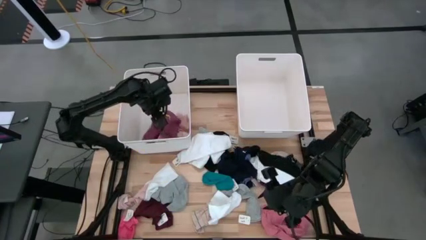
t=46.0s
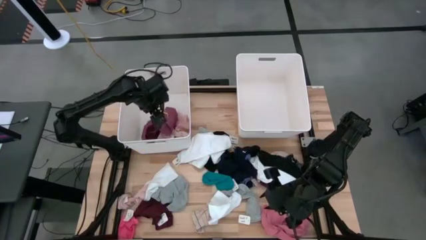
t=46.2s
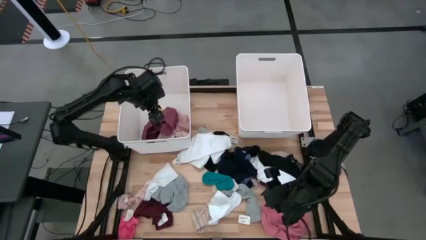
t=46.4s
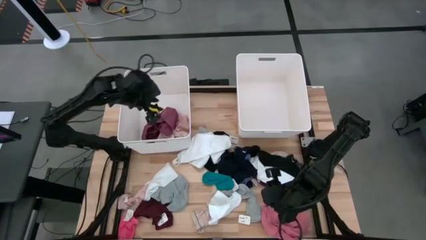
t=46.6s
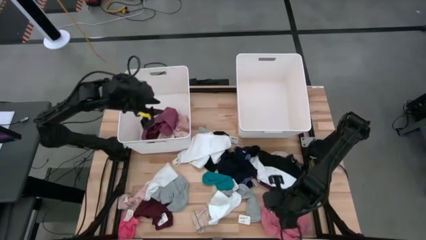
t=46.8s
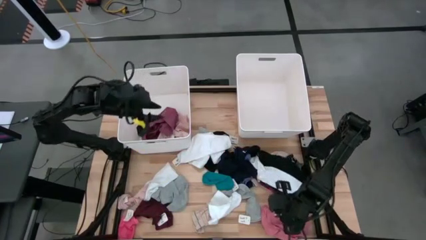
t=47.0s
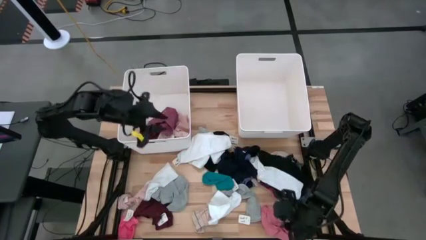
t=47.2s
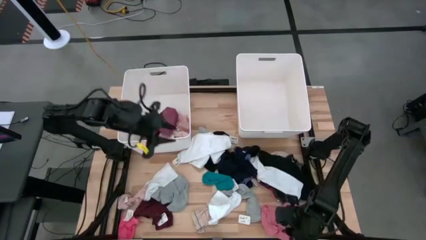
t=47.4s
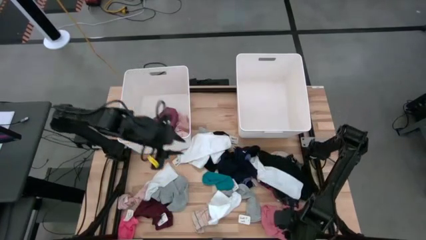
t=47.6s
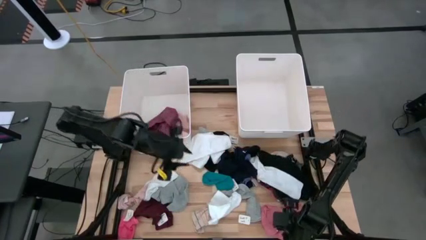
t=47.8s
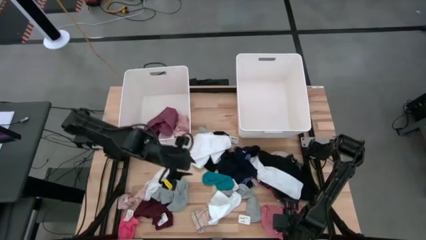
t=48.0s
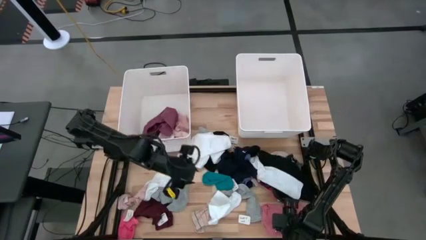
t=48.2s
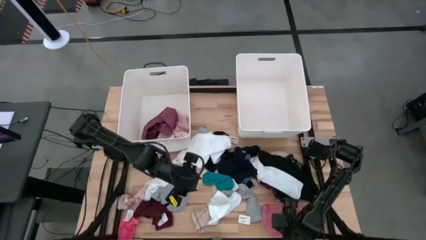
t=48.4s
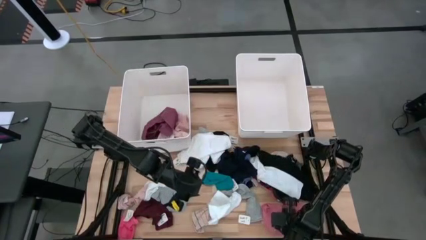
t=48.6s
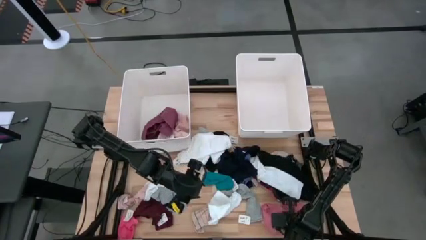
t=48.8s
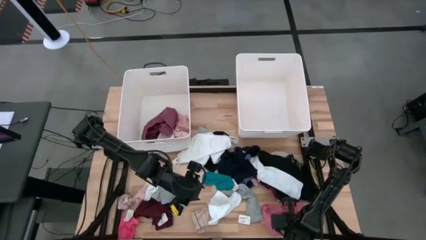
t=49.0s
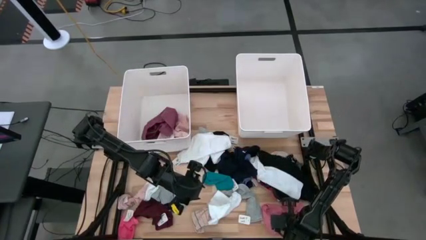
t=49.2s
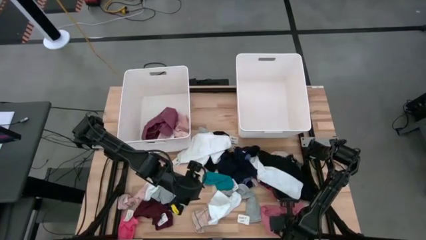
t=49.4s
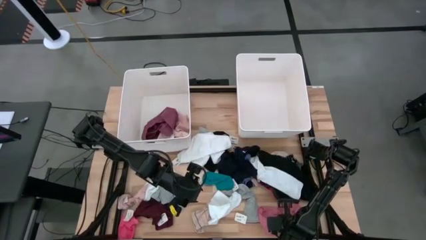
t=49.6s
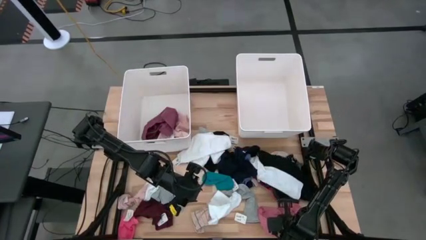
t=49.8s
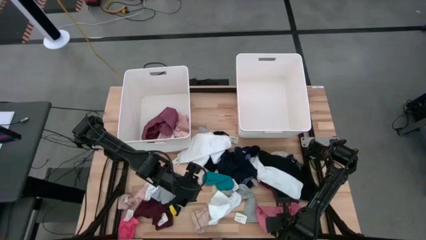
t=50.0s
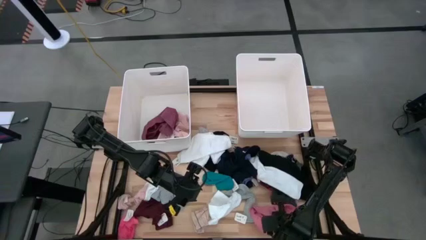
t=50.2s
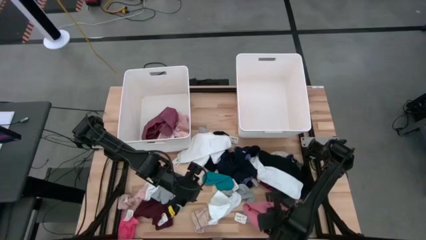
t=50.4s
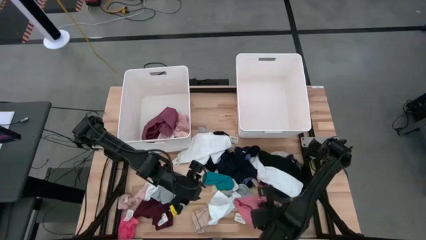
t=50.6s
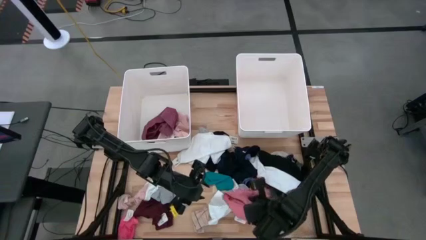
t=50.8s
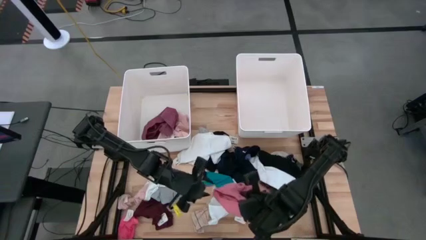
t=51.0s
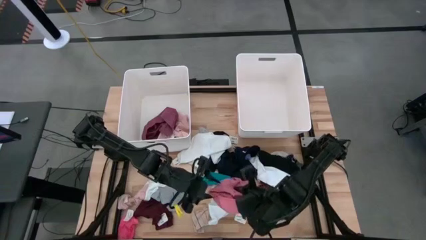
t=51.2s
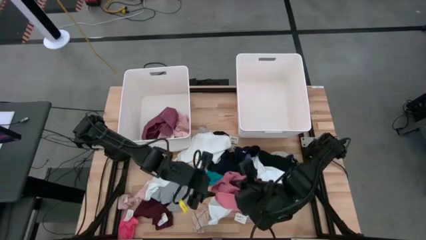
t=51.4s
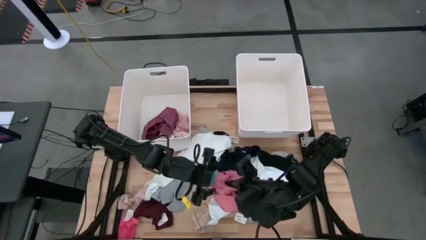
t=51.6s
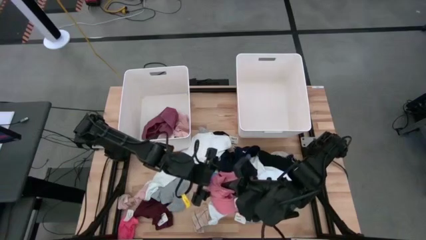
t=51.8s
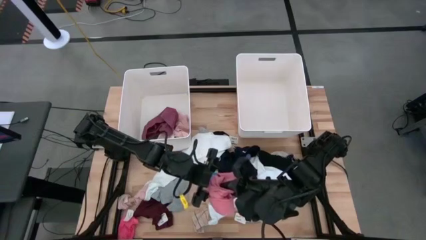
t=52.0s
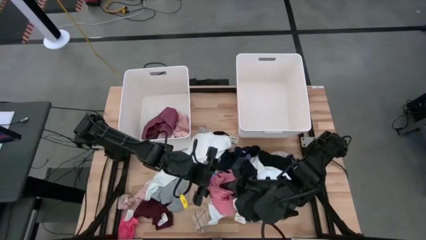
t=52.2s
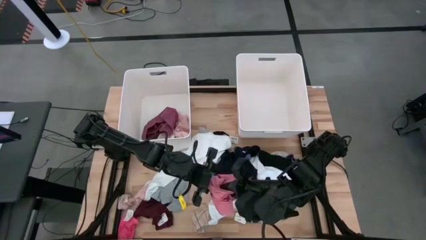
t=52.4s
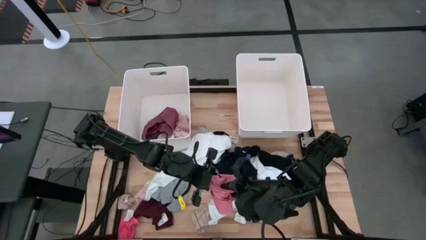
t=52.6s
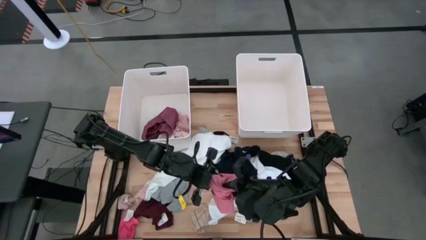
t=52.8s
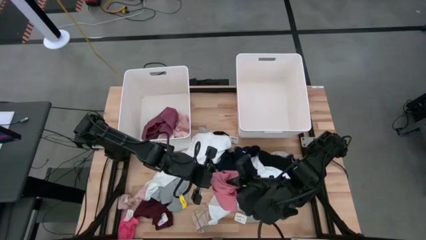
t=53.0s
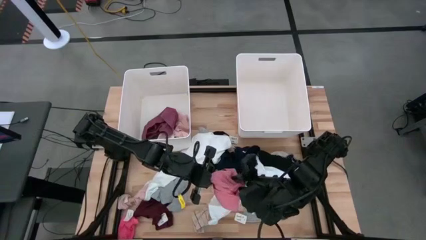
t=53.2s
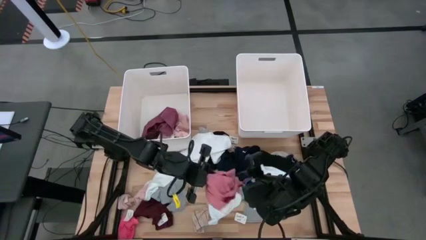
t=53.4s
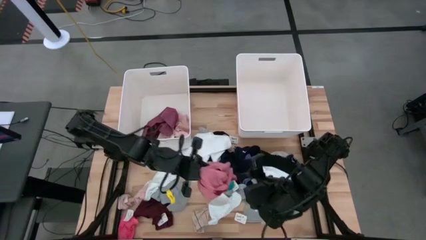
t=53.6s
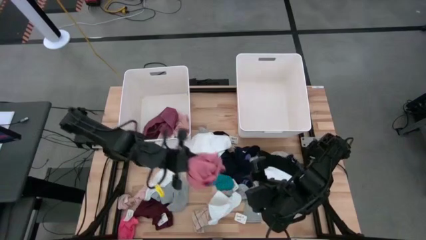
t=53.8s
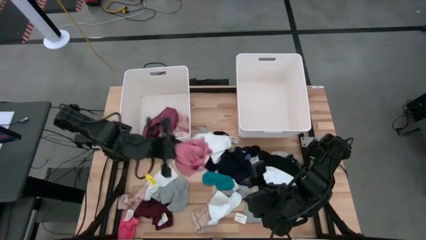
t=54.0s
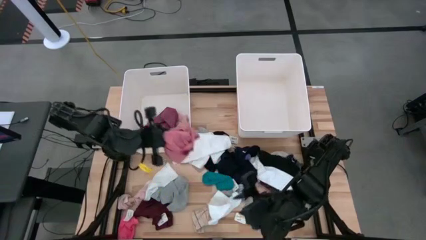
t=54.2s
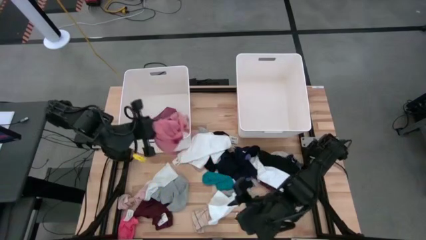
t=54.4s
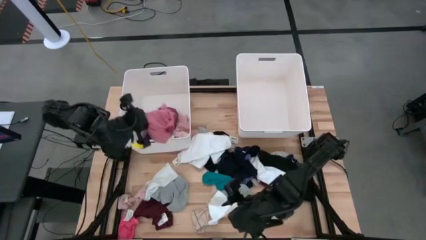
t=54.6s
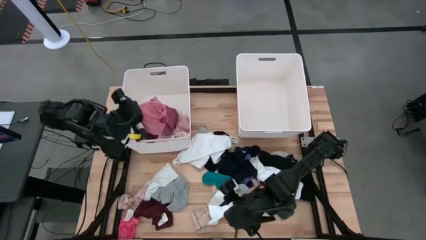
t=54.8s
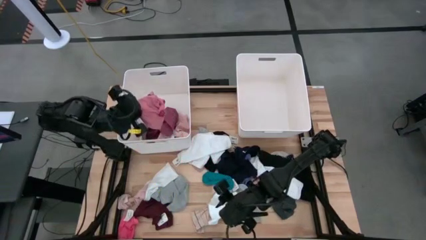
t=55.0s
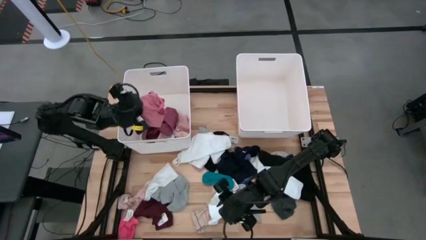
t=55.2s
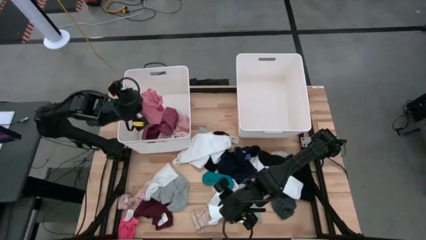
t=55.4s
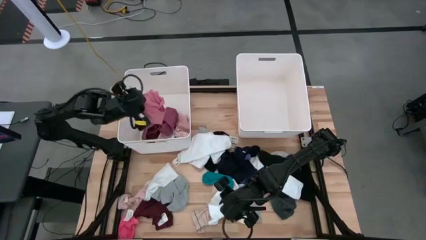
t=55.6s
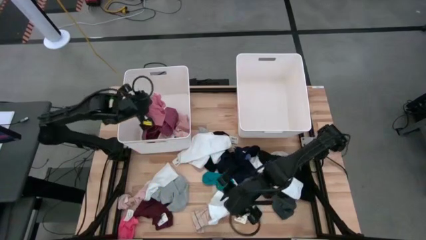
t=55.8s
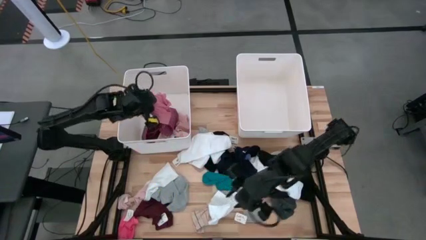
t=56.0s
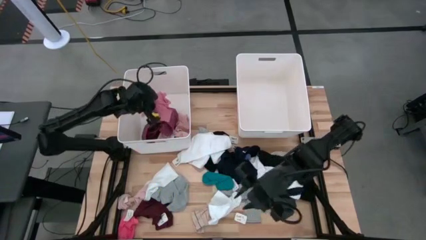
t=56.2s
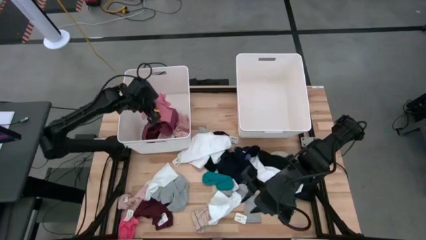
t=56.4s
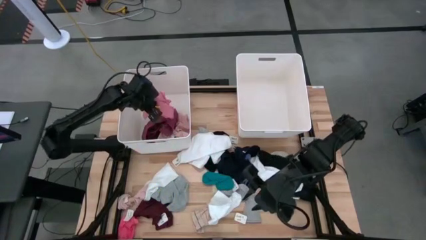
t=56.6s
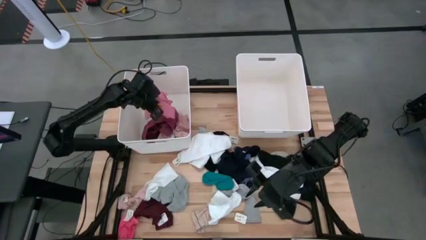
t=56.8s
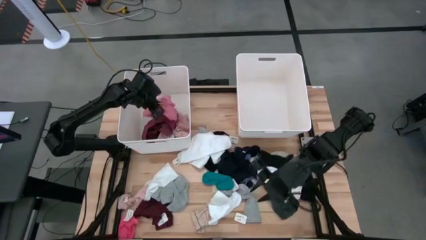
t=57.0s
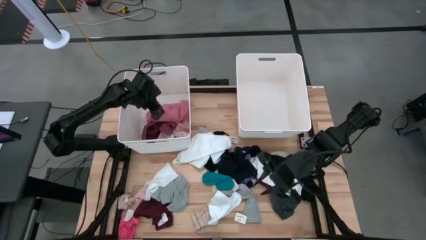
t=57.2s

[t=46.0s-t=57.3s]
Task: Sort clothes
Put the pink underwear into the left white bin
